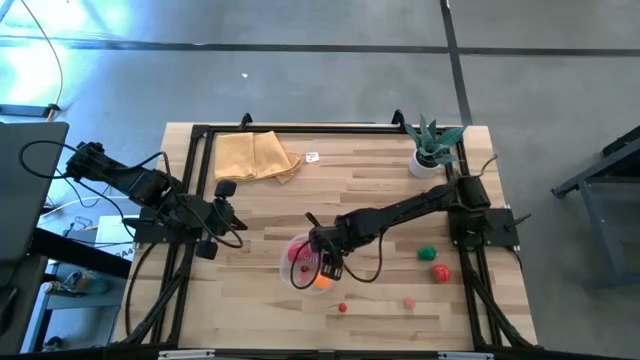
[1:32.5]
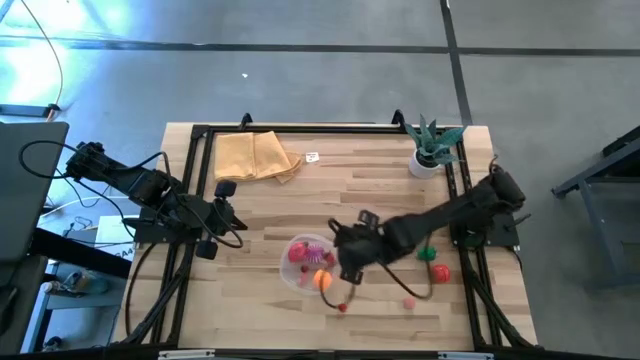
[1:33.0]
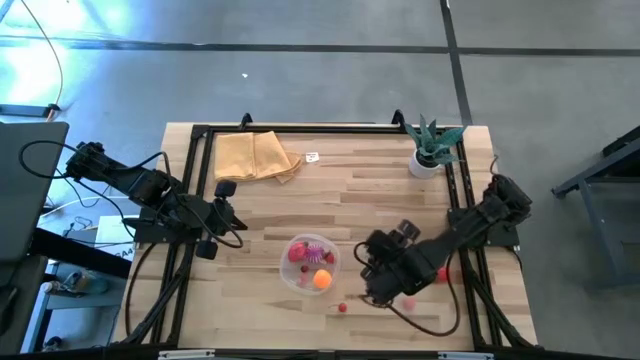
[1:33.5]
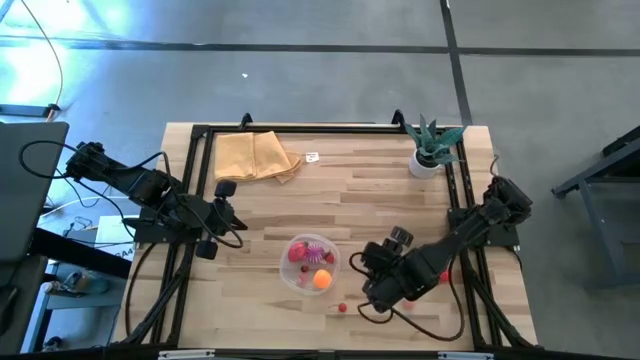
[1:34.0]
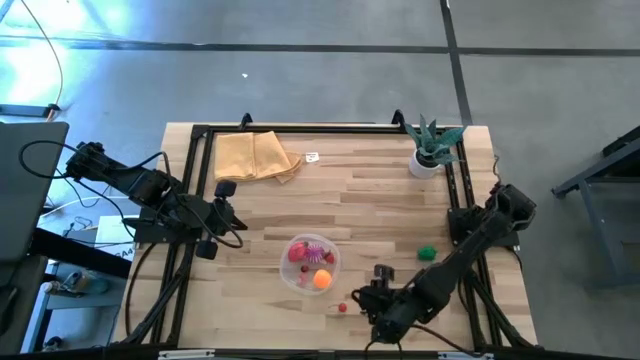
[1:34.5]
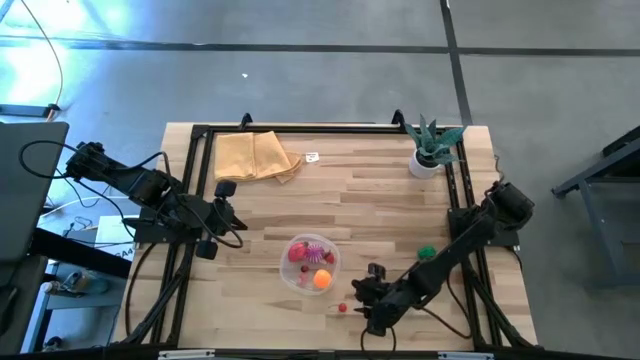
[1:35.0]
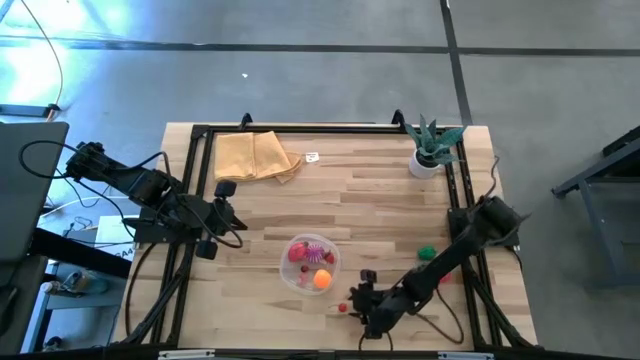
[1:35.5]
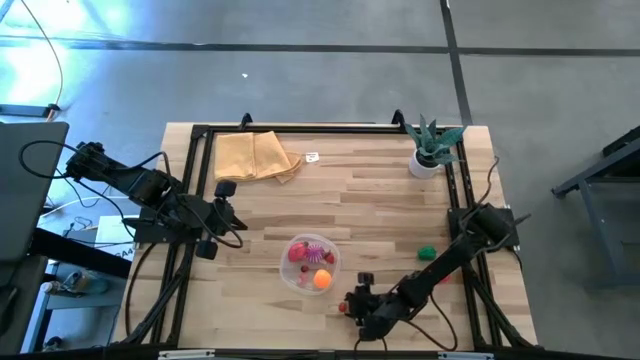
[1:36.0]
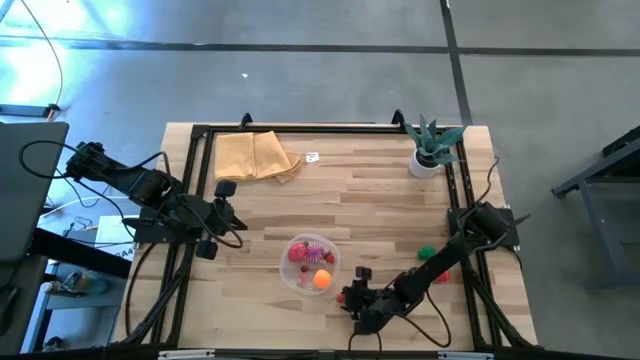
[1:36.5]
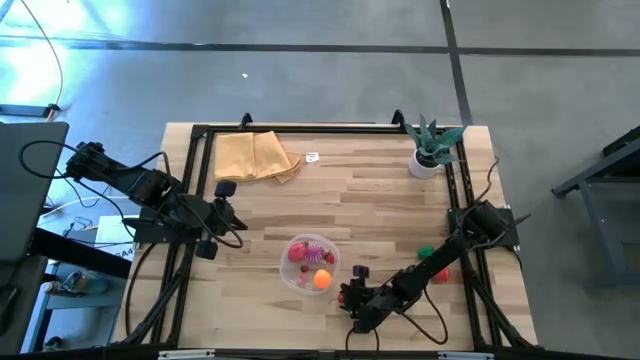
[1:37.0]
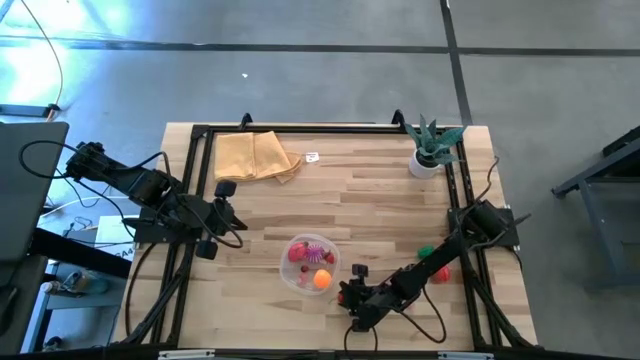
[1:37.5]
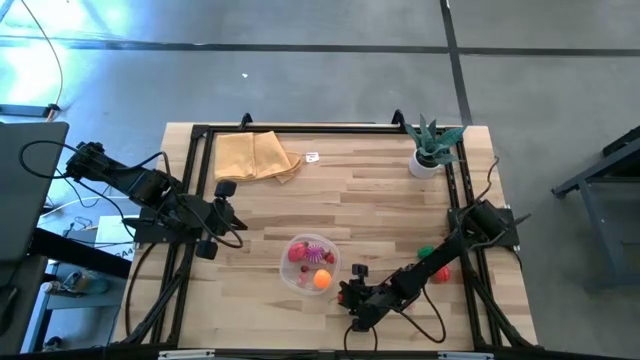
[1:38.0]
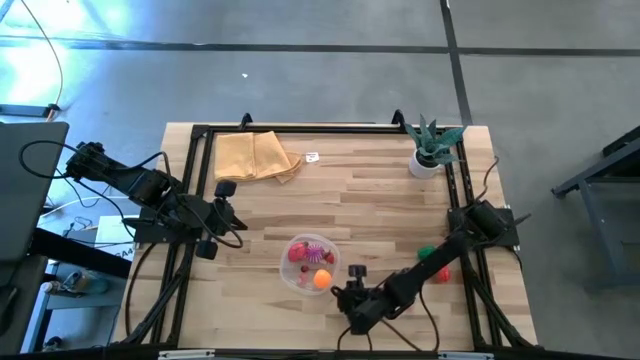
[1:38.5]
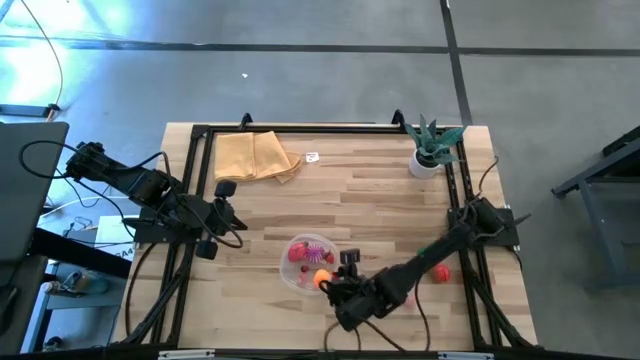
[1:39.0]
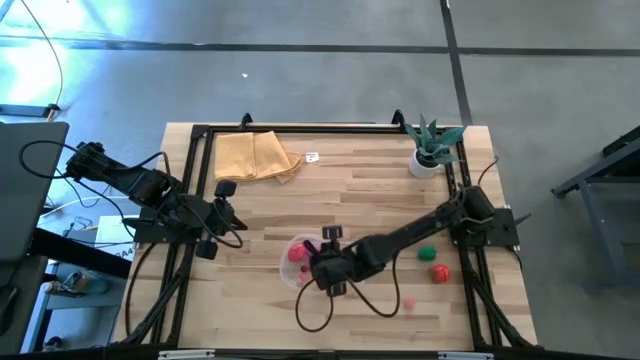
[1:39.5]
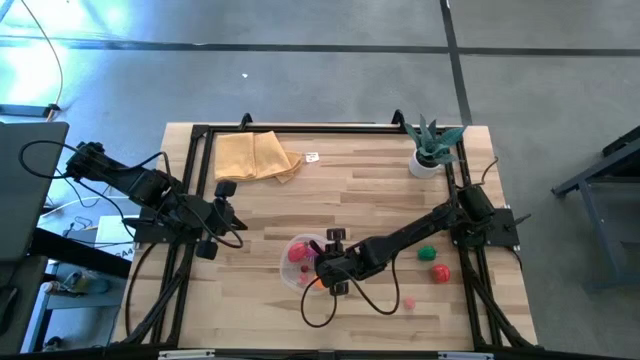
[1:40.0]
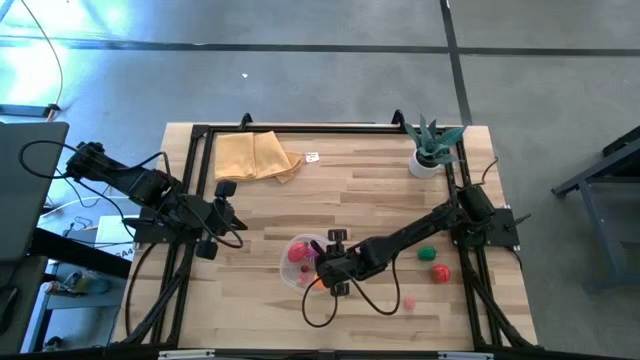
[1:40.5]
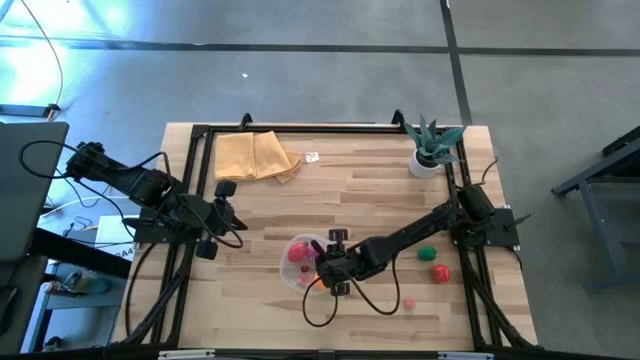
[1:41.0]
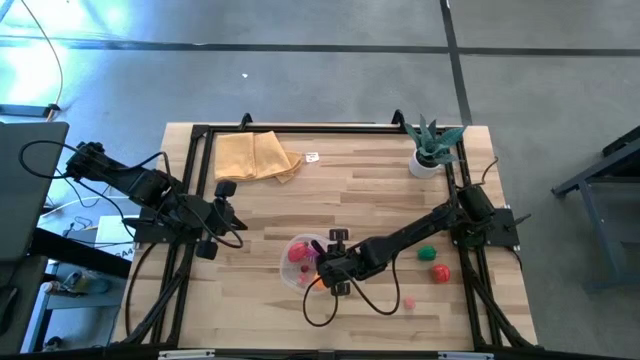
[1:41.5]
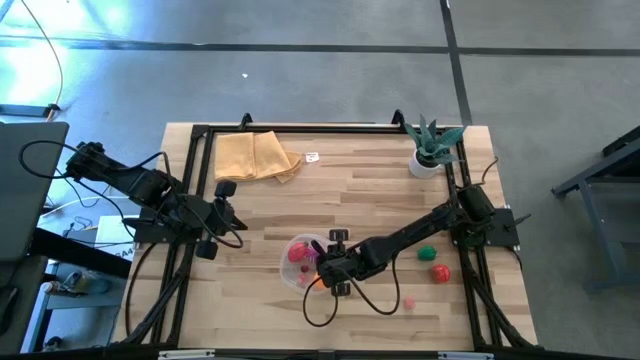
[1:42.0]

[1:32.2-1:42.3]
Task: Pick and placing Produce into tupperware
Put the cherry into the bin

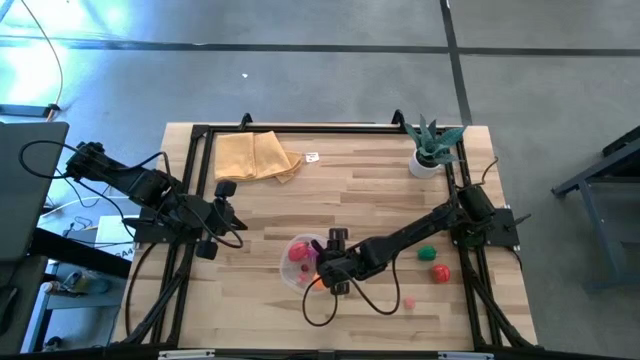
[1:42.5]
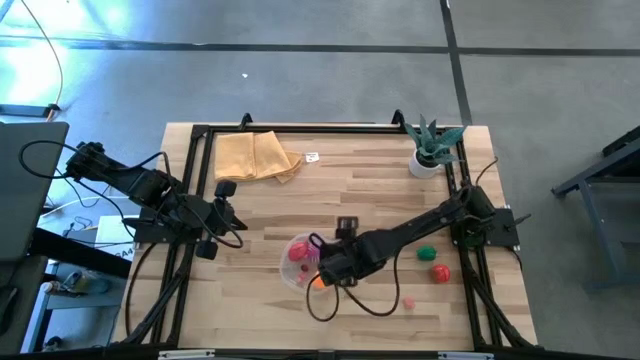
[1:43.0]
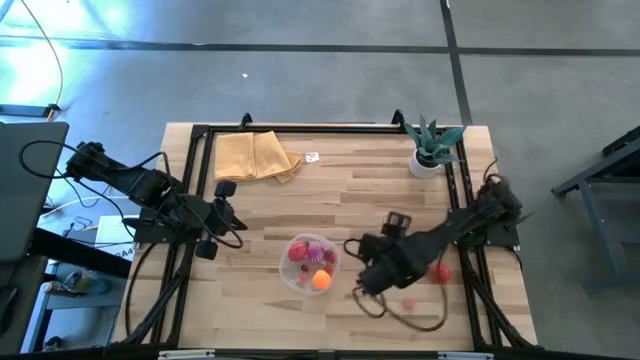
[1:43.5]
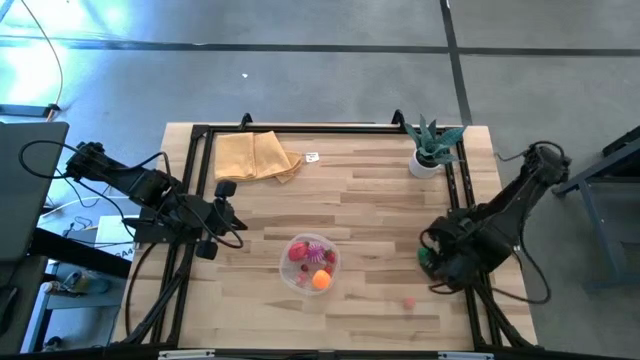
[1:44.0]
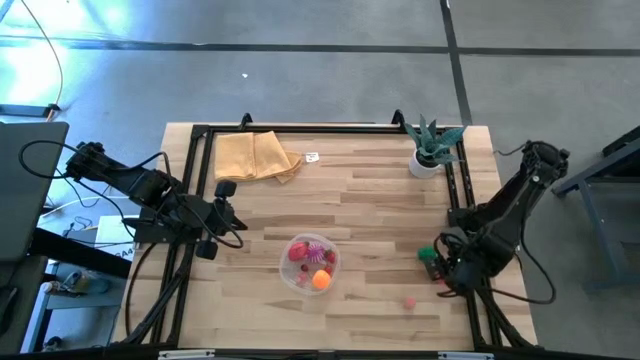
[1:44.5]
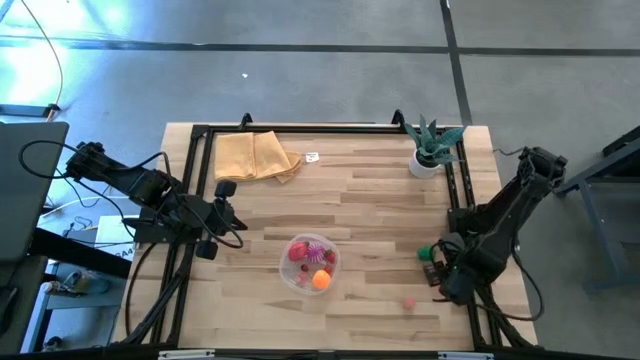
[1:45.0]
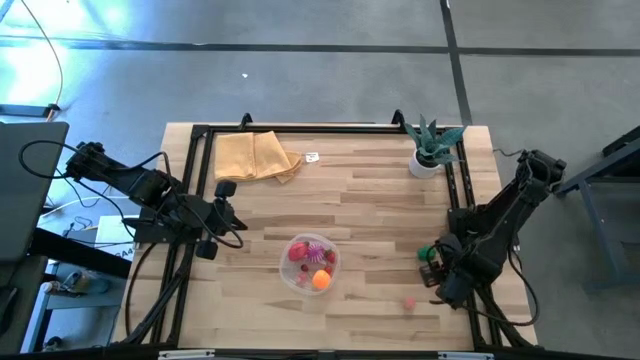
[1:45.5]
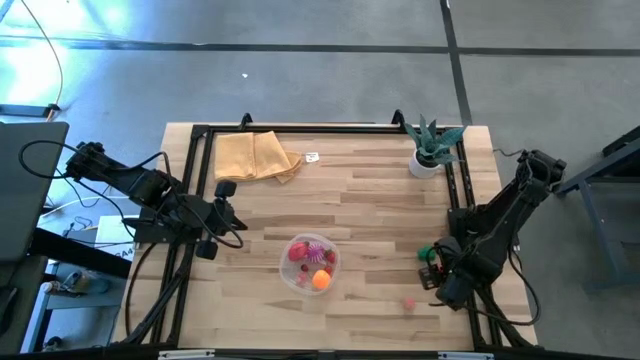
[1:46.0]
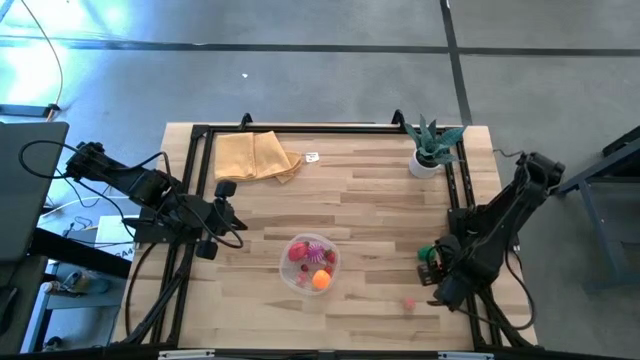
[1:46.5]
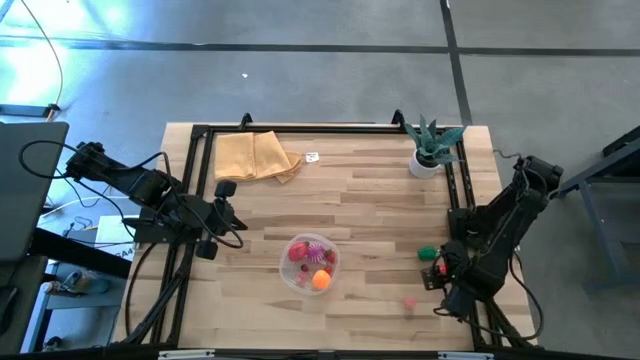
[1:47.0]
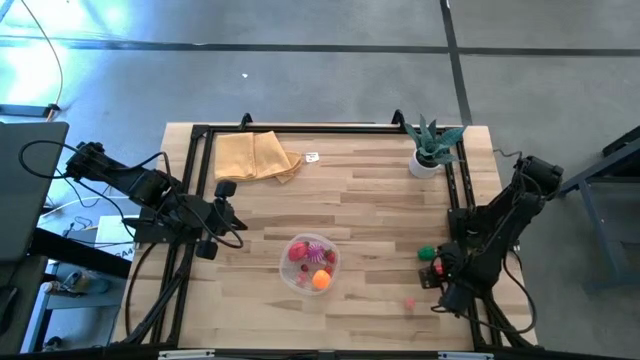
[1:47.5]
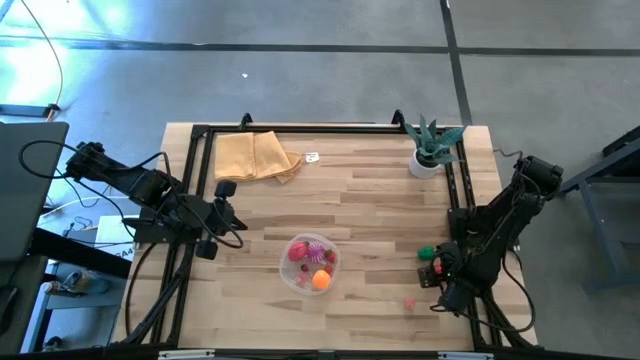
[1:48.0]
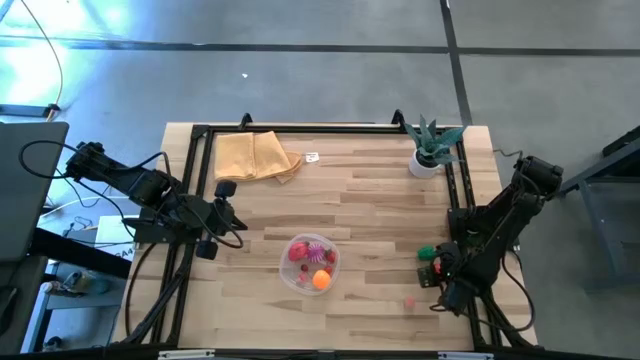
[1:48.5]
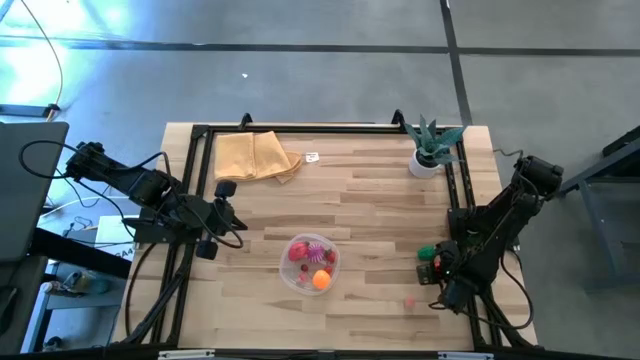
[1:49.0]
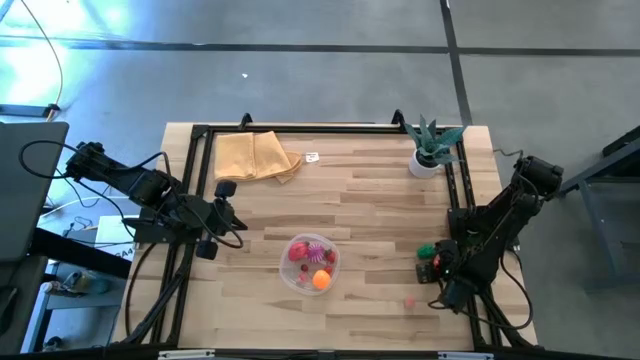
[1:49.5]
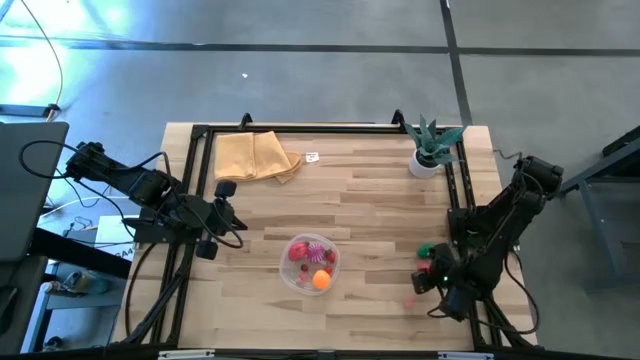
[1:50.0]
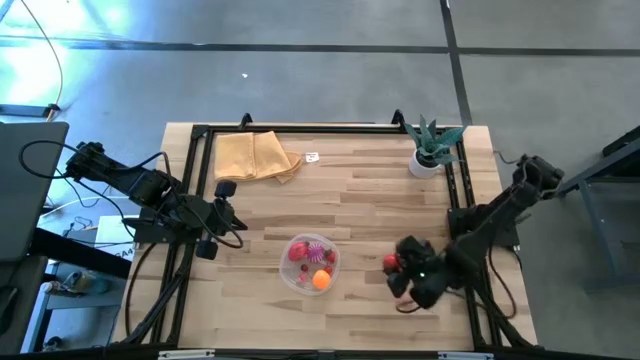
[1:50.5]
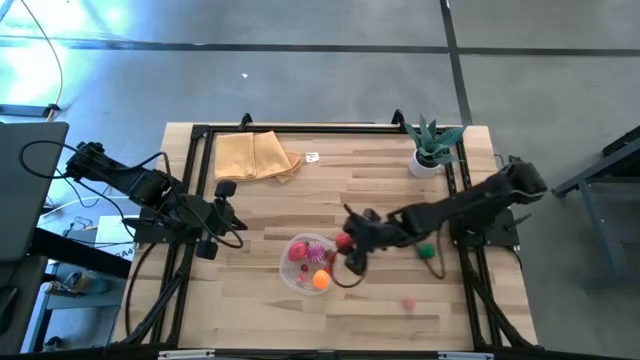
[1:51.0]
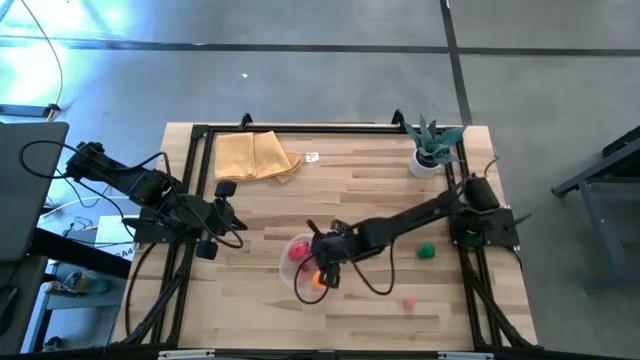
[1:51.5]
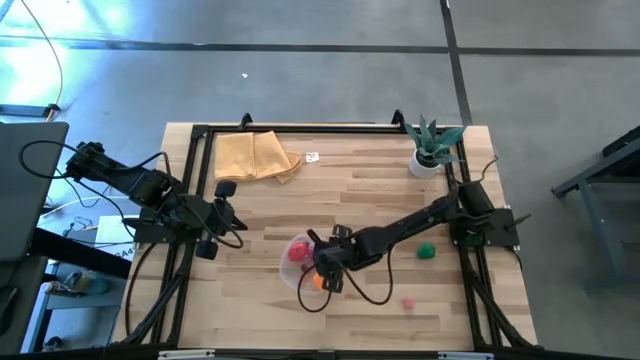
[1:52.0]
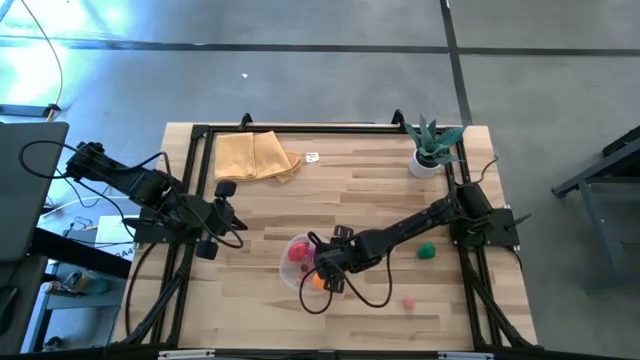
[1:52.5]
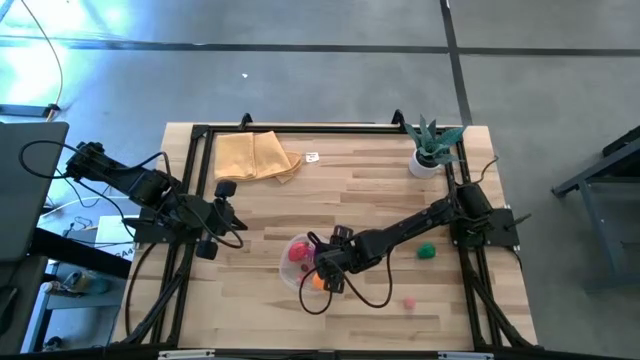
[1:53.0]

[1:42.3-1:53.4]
Put the tomato into the bin
